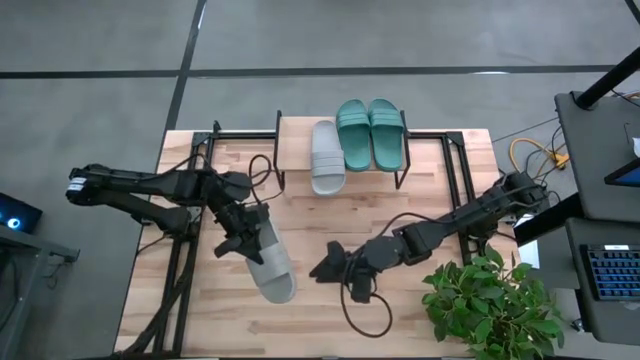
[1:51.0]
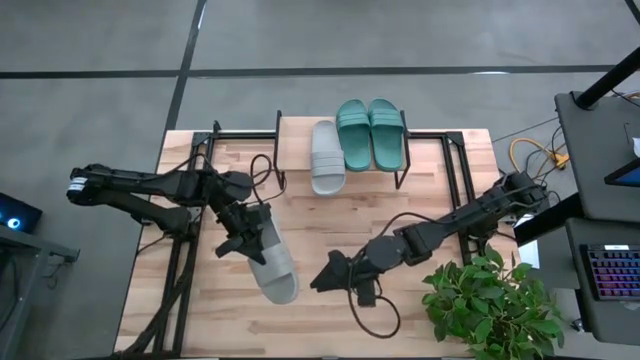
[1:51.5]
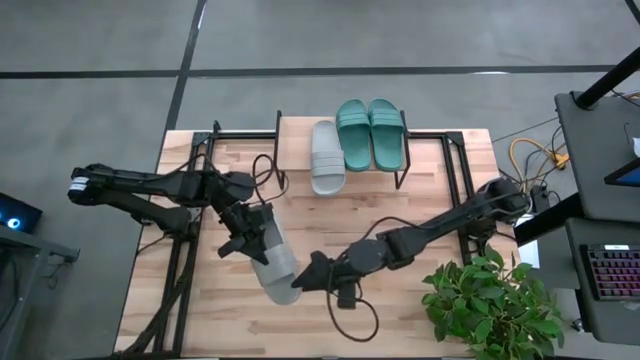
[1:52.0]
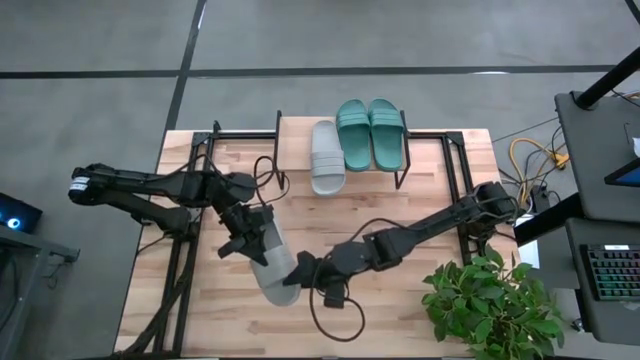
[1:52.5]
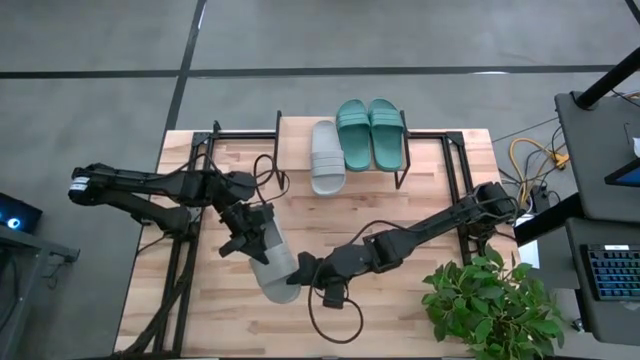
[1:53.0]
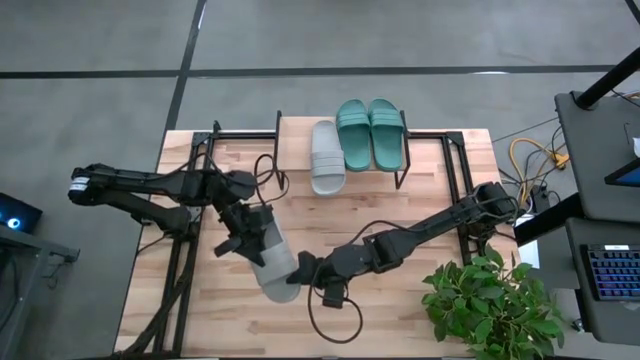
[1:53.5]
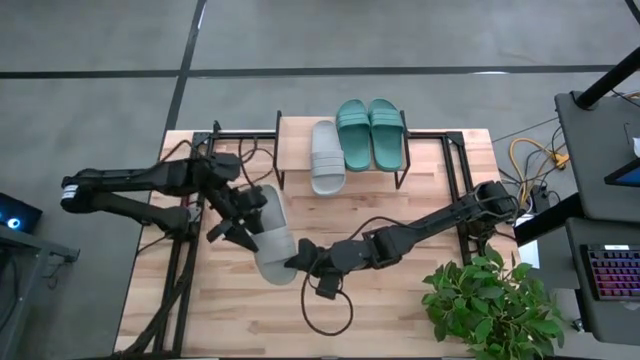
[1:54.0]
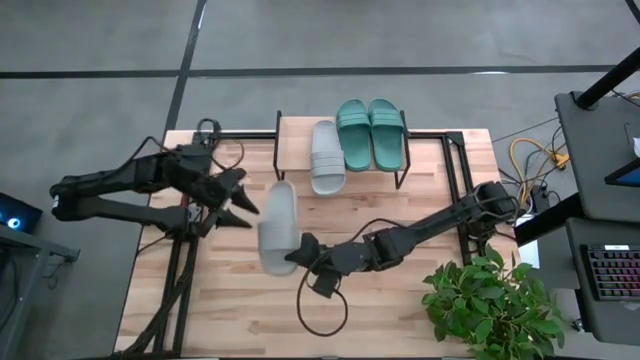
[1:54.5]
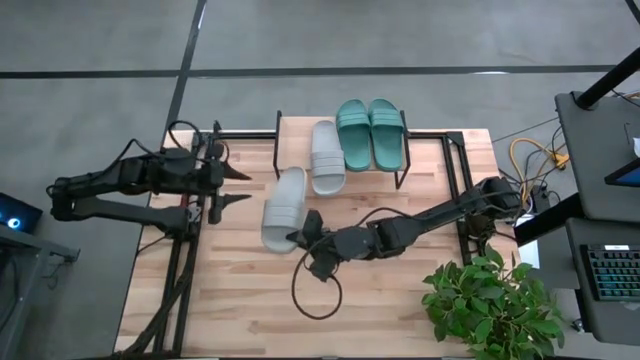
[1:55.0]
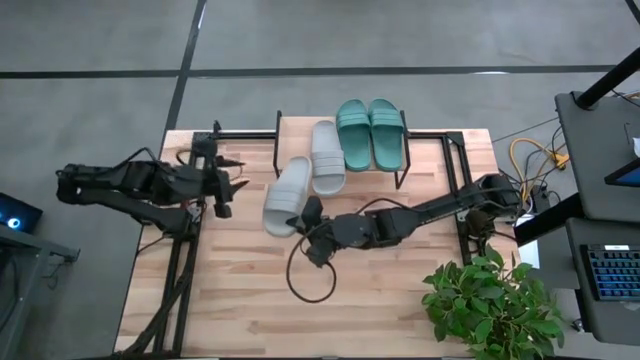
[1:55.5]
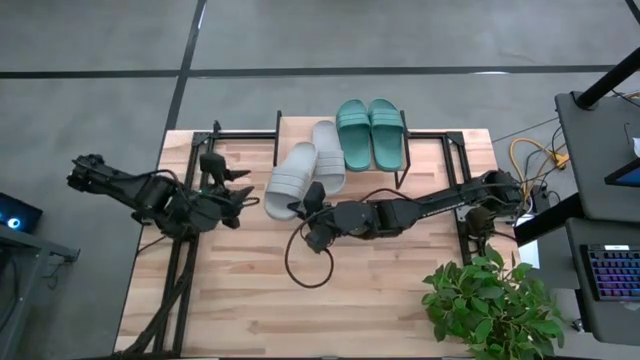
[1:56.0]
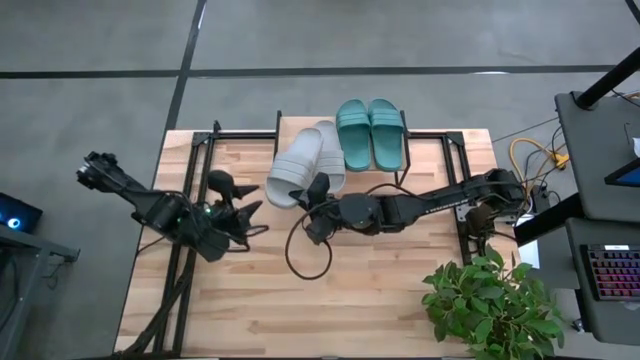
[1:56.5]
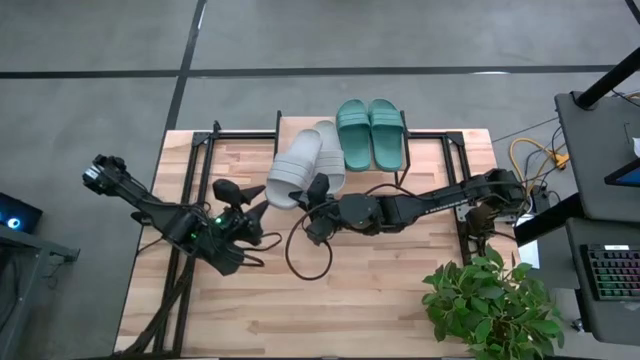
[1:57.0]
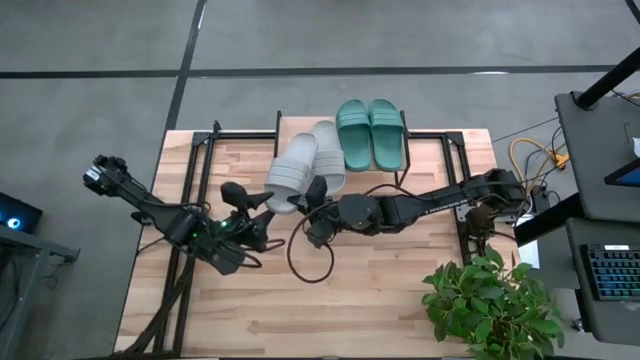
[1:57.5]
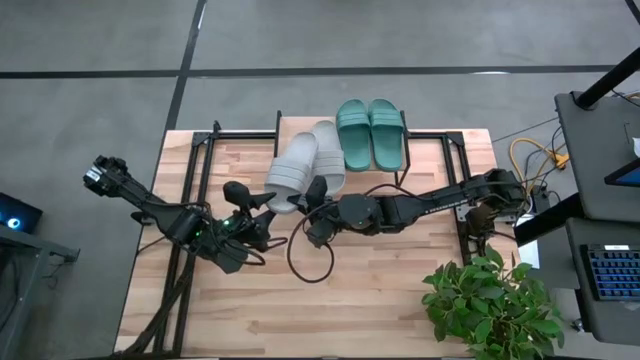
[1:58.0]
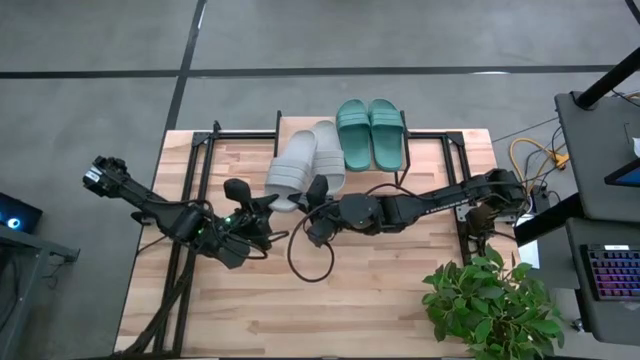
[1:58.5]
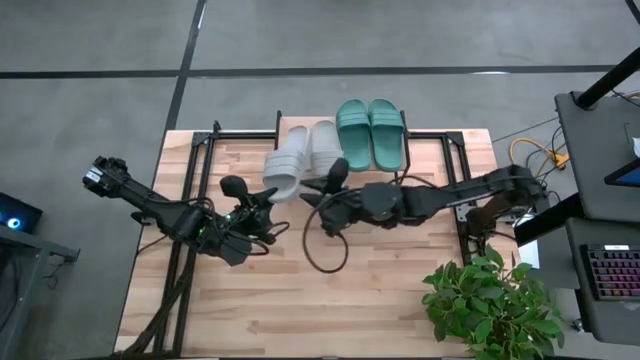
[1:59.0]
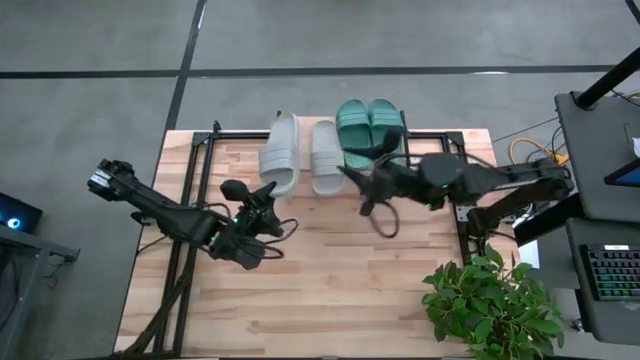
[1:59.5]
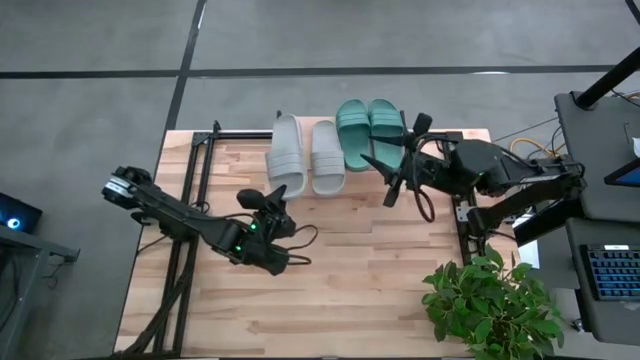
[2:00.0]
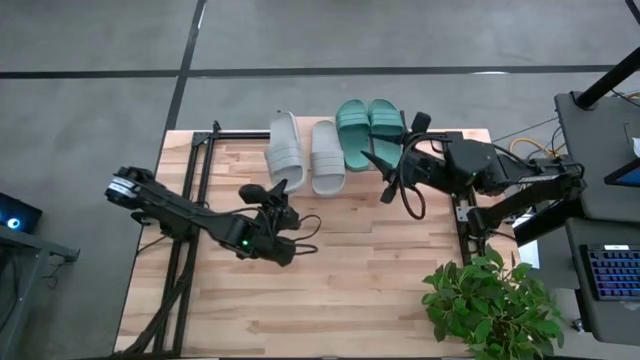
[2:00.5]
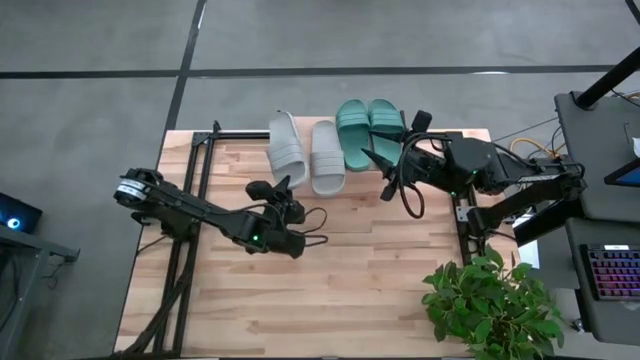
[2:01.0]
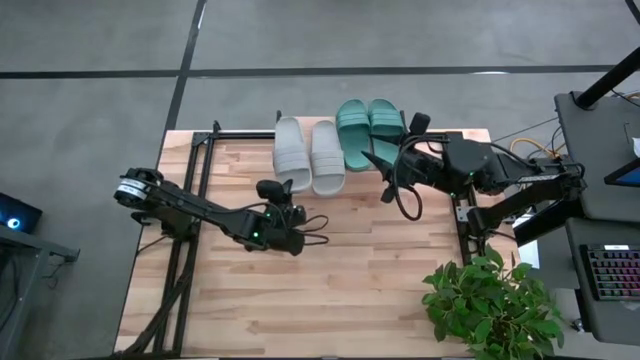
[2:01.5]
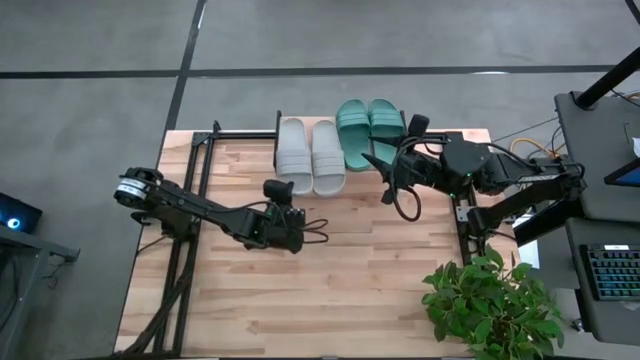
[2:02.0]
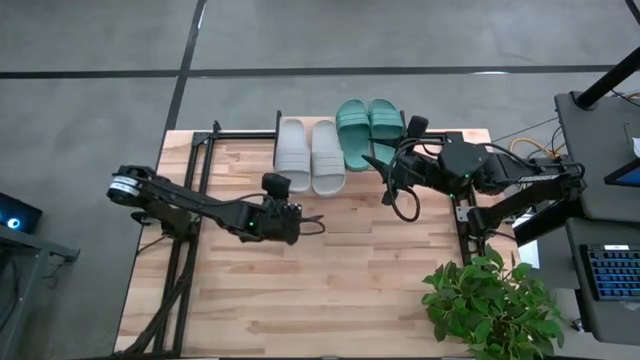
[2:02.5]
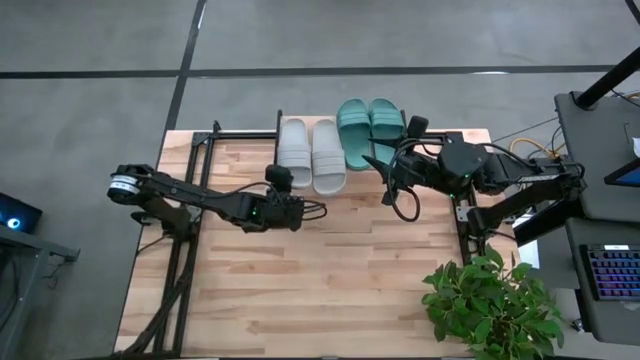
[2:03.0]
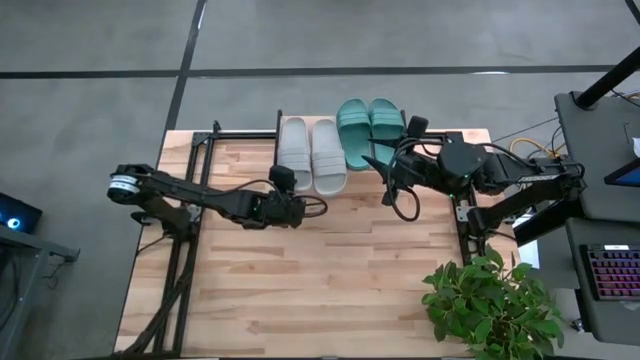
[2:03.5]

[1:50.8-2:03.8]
Task: Pick and place slides into the shelf
Put the gray slide on the shelf

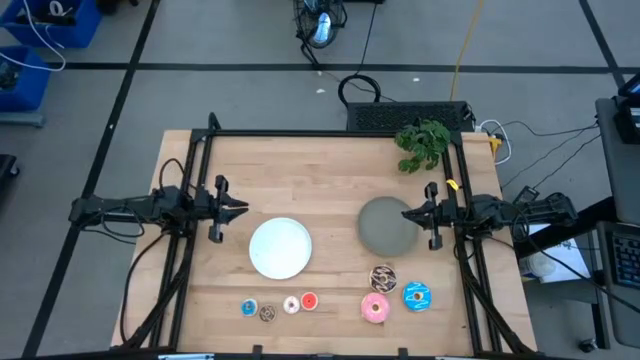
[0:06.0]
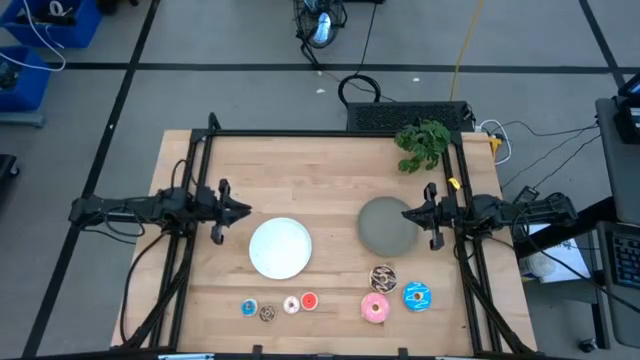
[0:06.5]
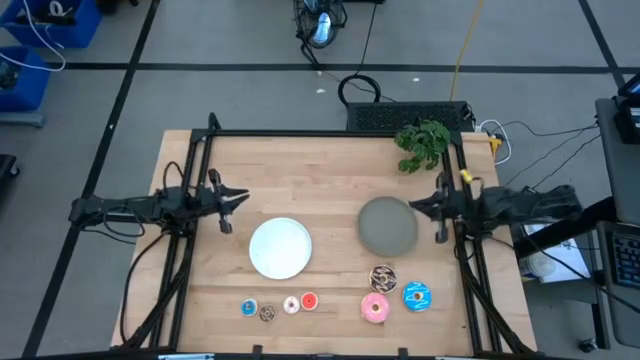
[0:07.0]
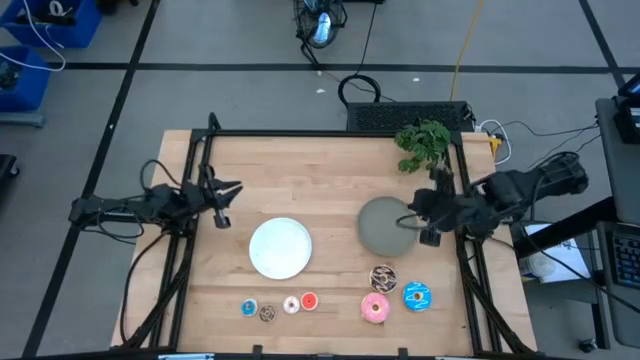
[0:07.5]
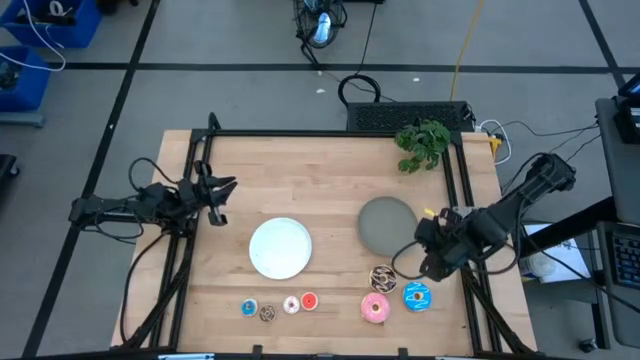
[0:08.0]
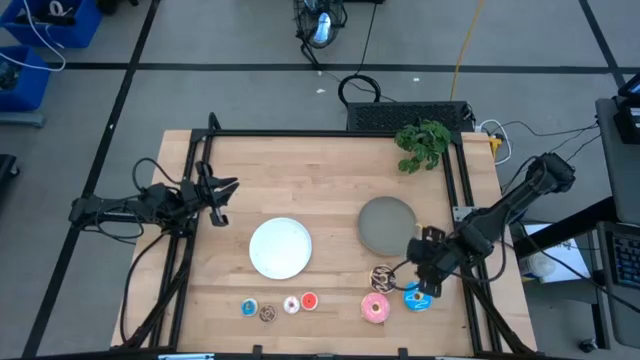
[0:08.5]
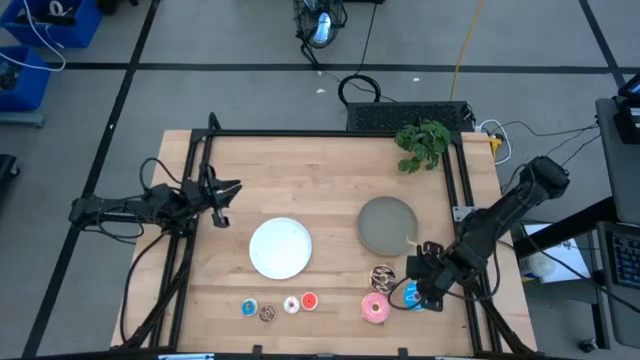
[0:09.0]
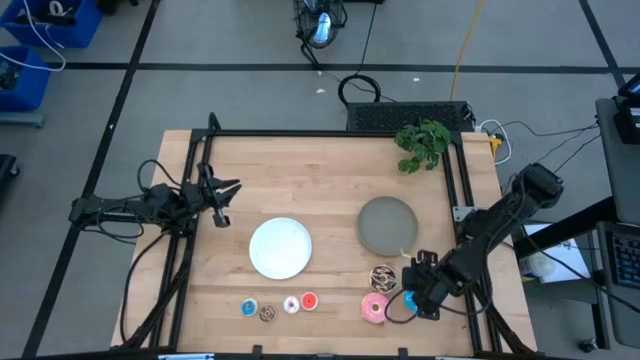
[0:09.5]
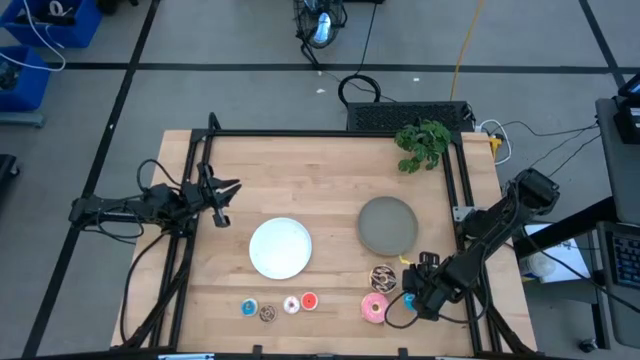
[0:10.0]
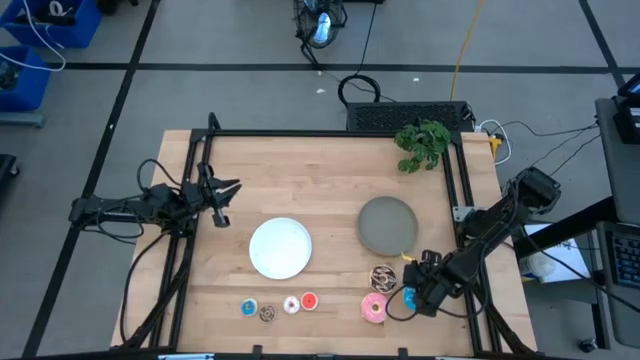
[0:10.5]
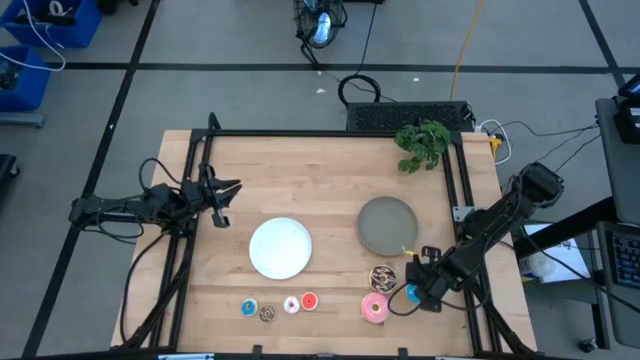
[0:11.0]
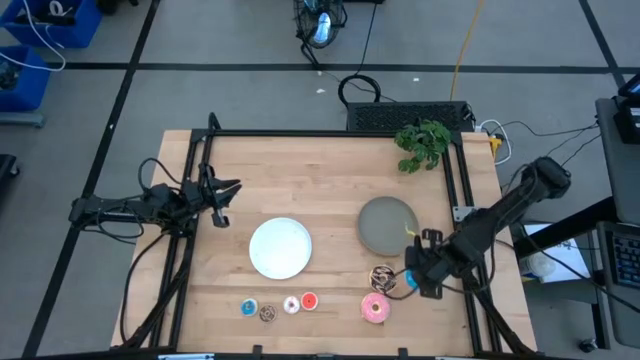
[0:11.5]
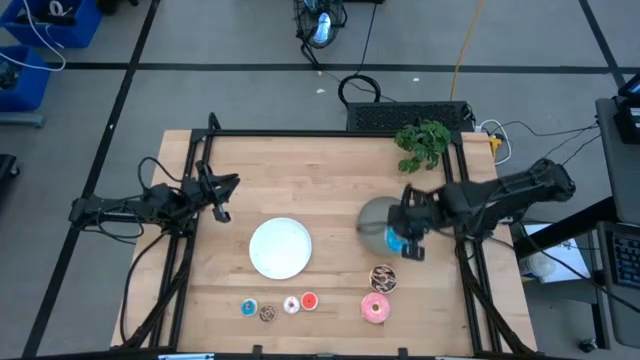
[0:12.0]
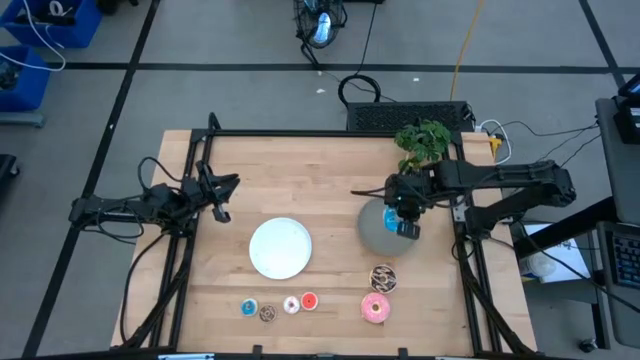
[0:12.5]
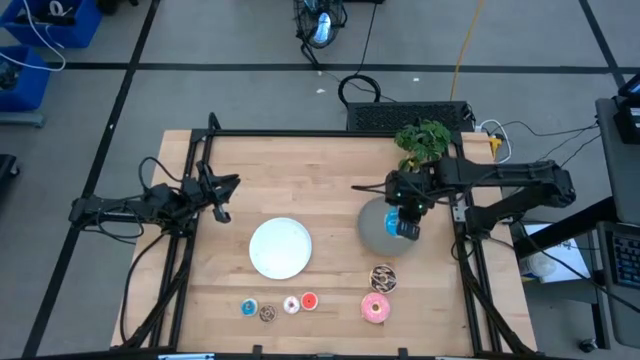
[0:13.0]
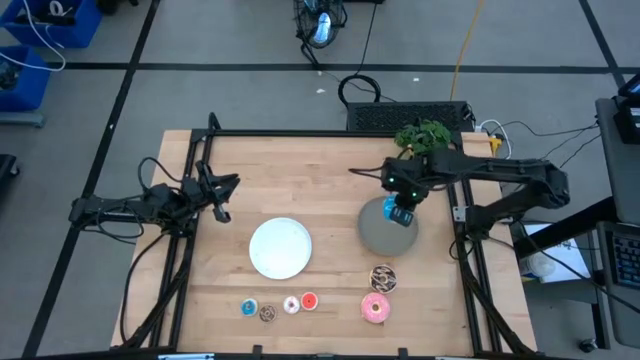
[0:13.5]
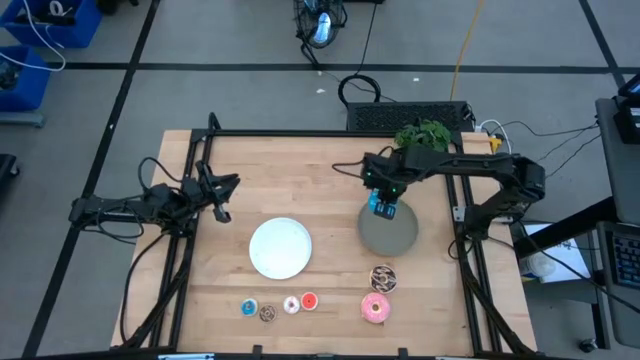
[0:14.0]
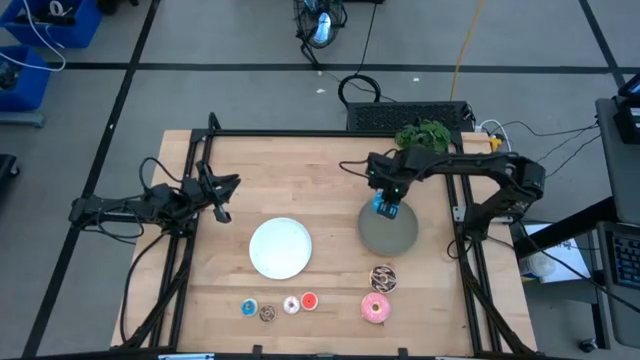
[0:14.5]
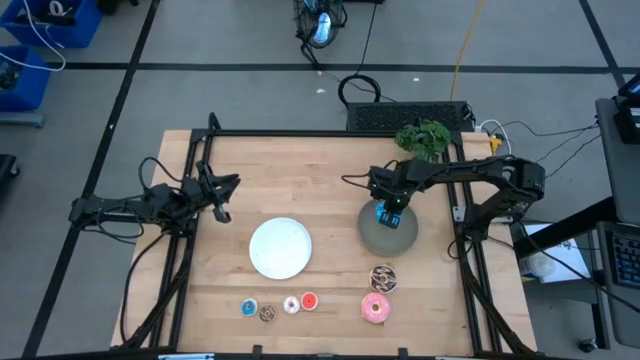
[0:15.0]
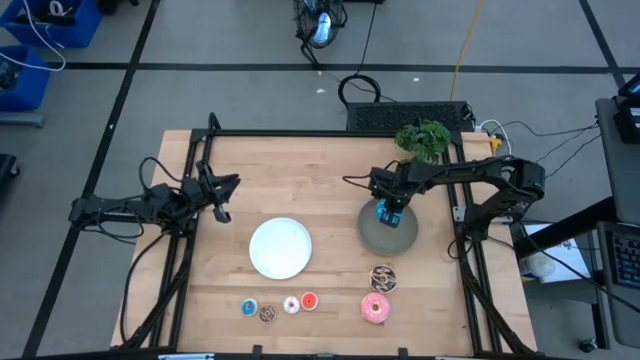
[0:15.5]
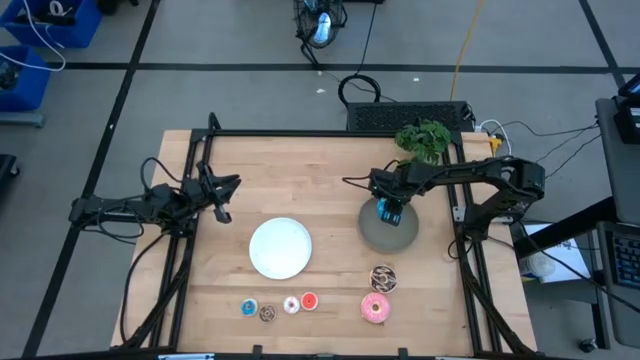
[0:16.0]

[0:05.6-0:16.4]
Task: Pick & Place donuts
Put the large blue donut on the gray plate
